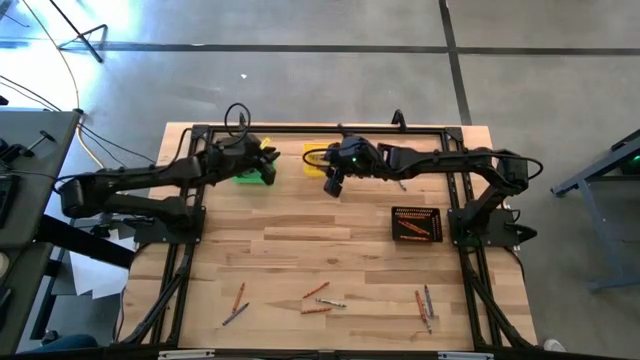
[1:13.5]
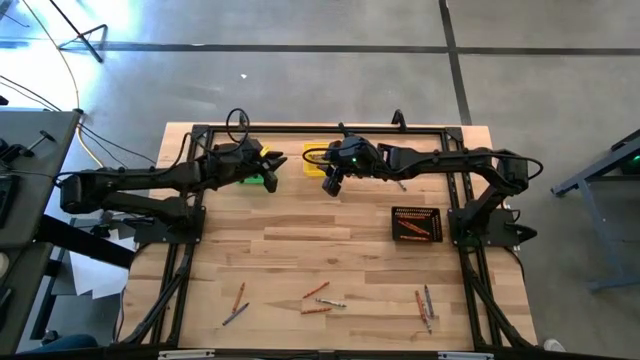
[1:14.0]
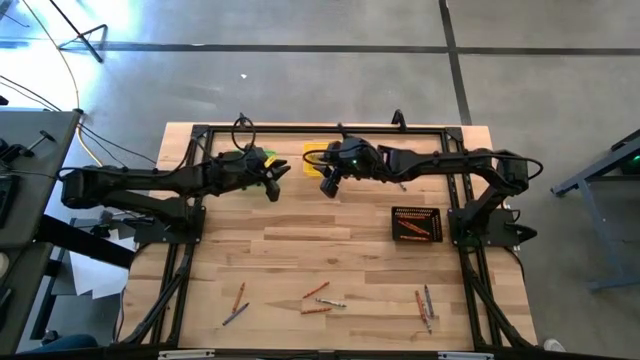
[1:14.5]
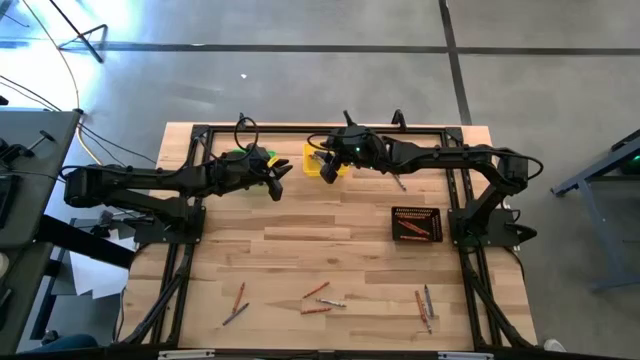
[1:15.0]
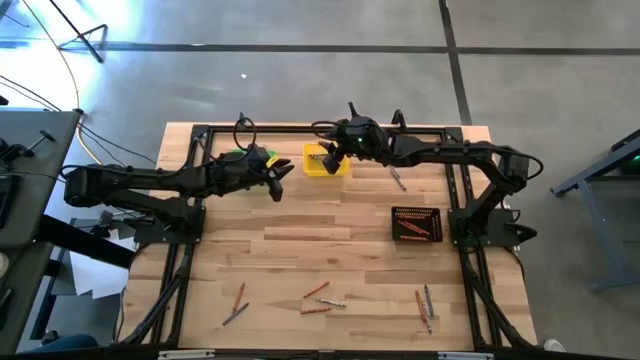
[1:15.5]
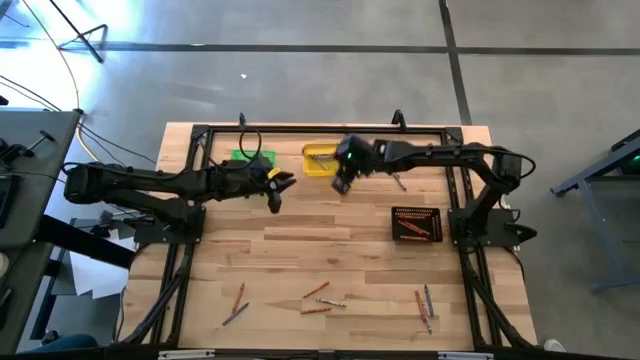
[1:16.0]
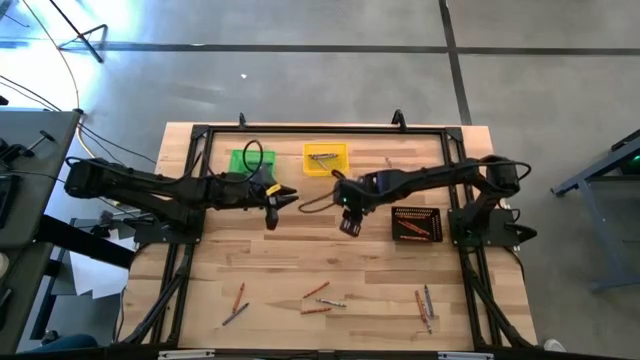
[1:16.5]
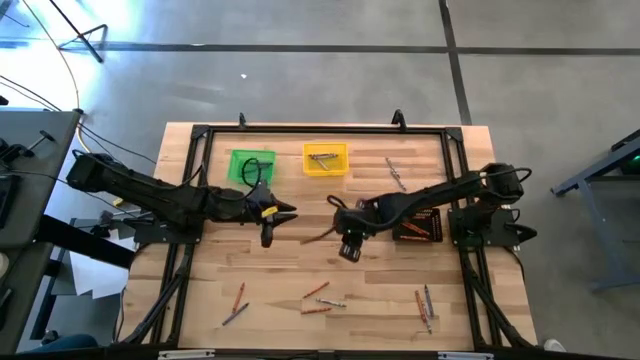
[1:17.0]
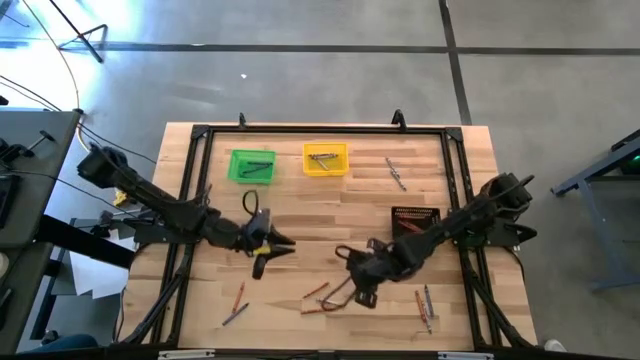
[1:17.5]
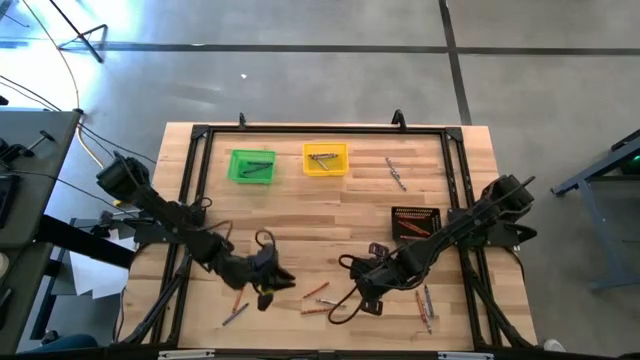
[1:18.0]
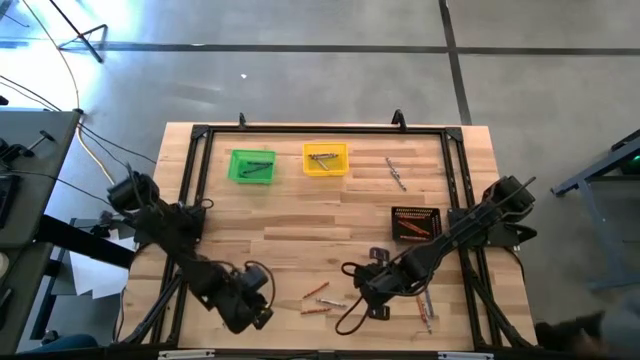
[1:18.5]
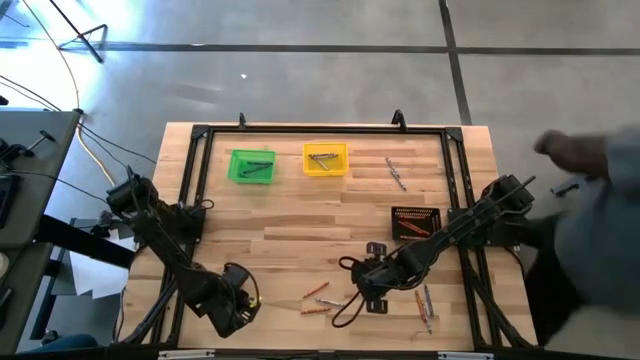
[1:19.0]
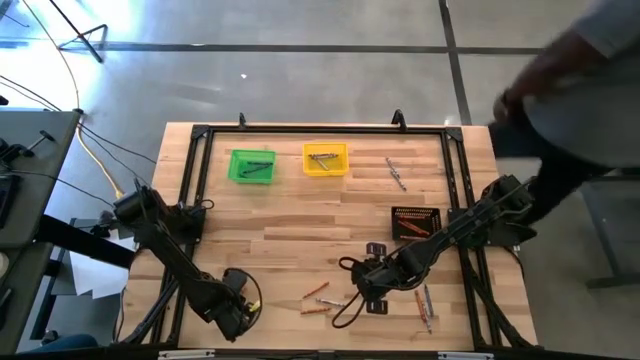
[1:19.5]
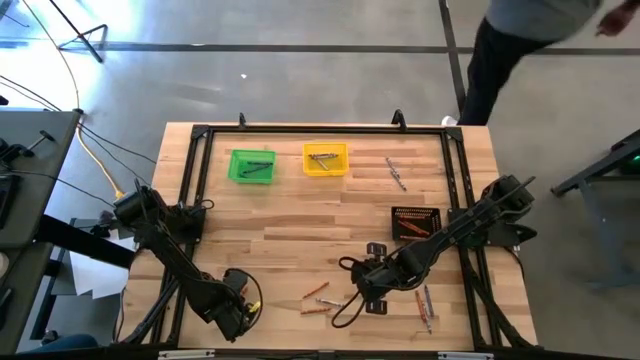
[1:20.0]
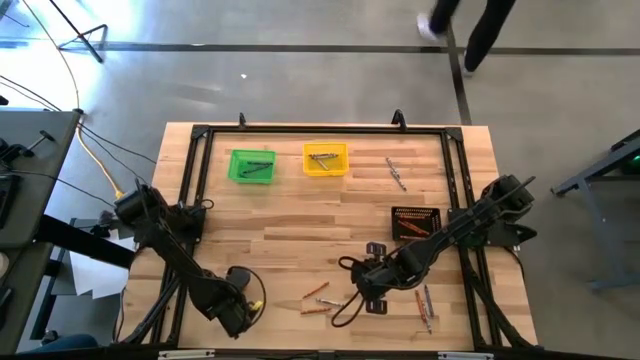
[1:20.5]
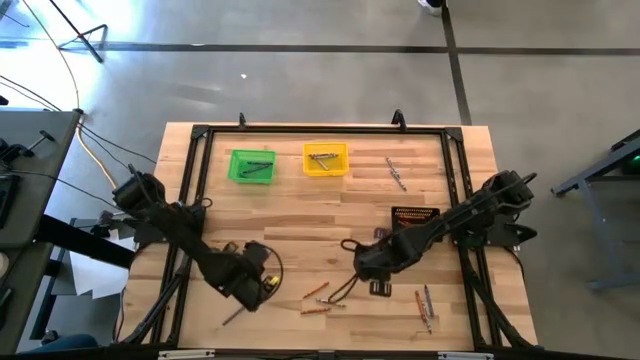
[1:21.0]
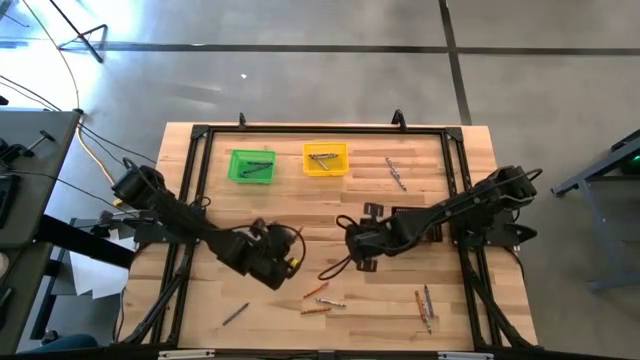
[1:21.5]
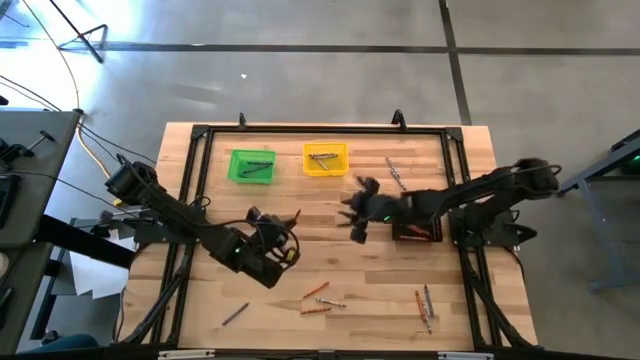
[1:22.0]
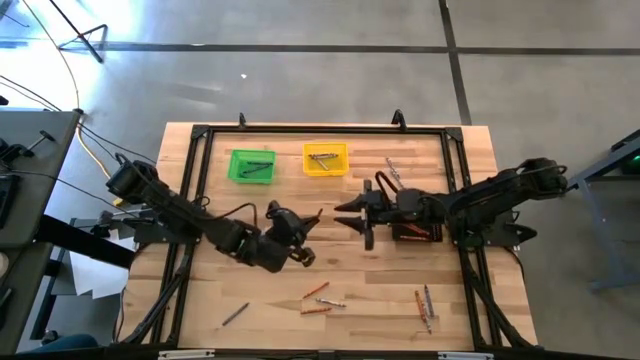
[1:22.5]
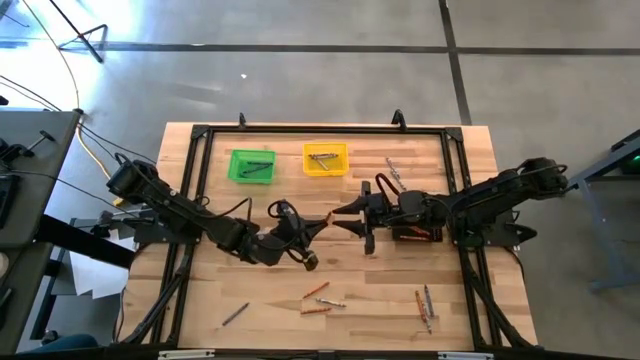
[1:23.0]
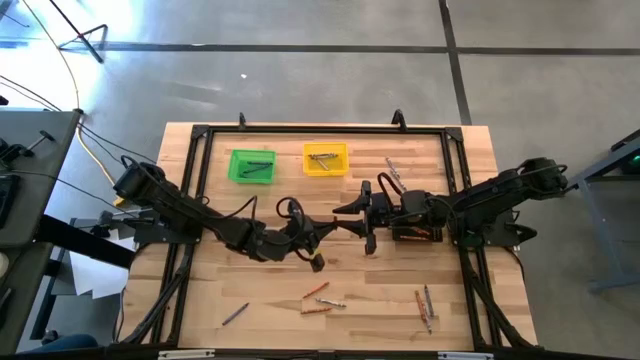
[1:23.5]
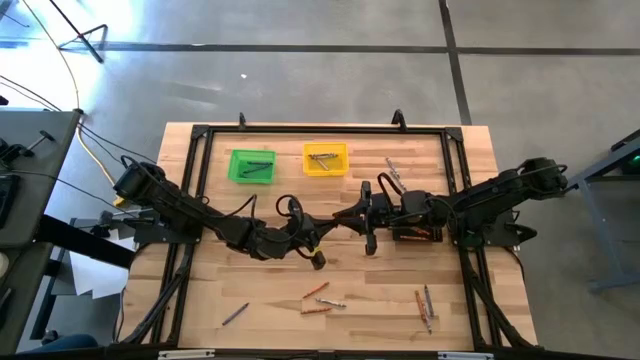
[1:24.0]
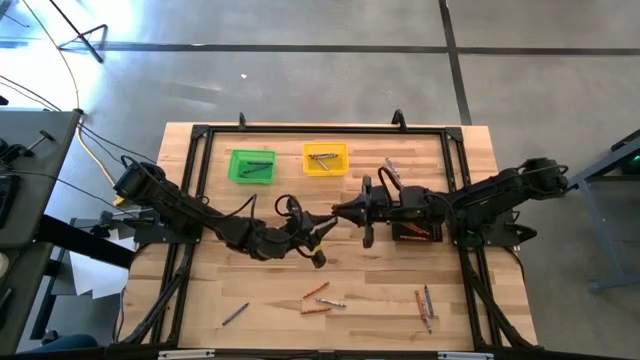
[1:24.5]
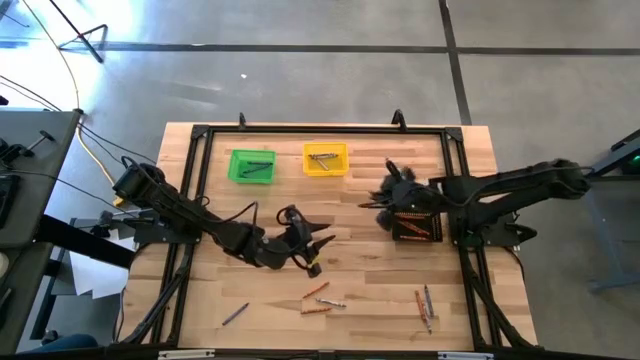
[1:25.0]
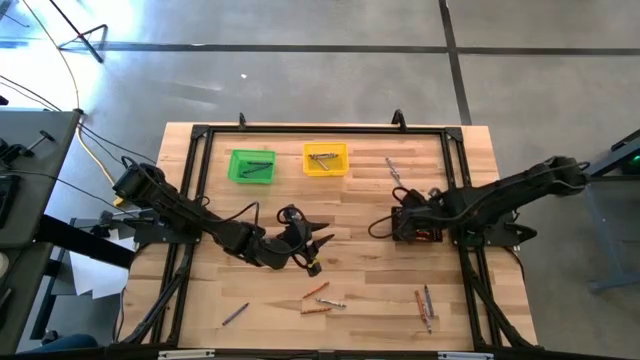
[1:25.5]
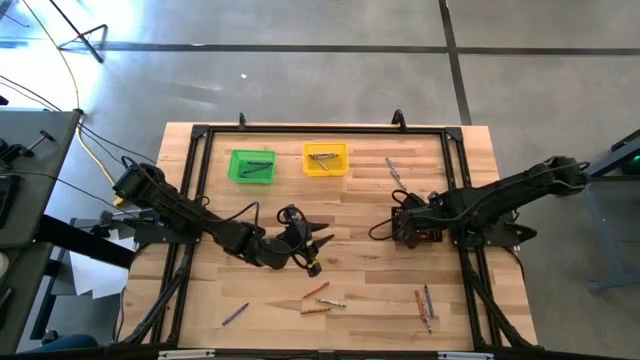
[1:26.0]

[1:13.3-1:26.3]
Task: Sort crayons
Put the orange crayon into the black bin

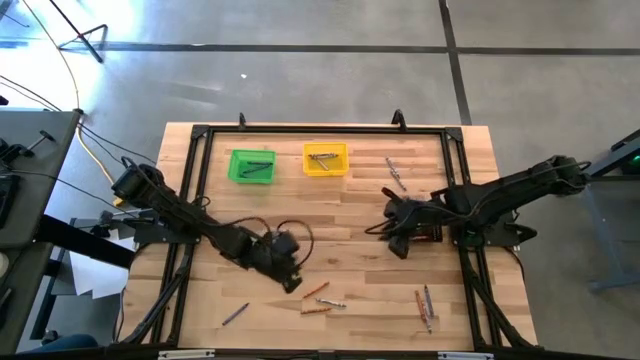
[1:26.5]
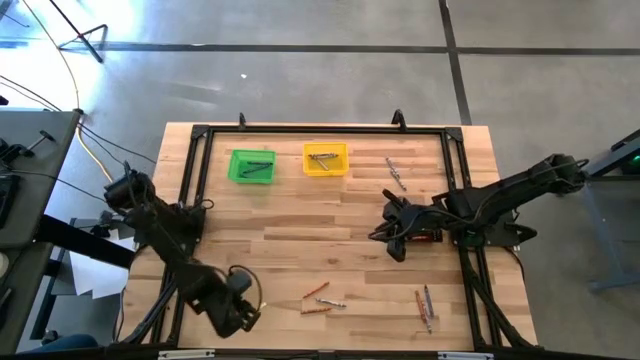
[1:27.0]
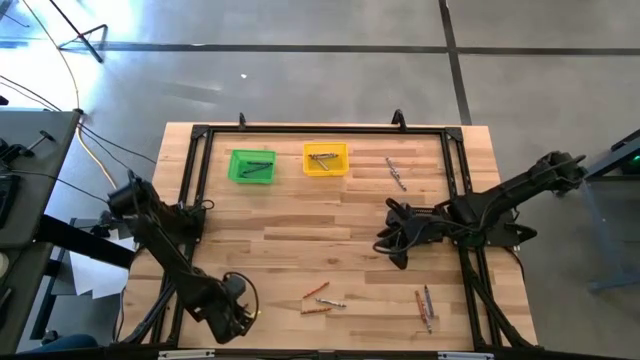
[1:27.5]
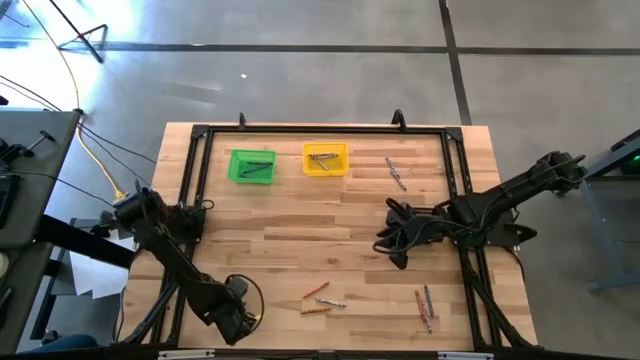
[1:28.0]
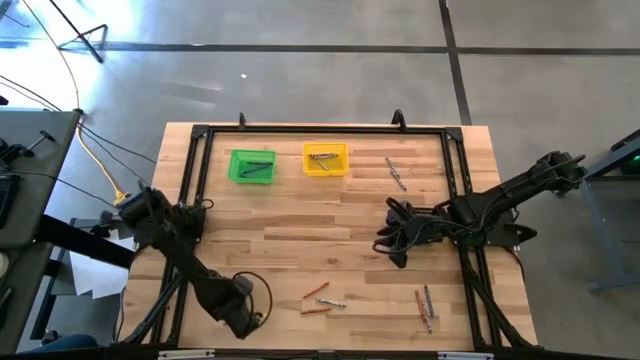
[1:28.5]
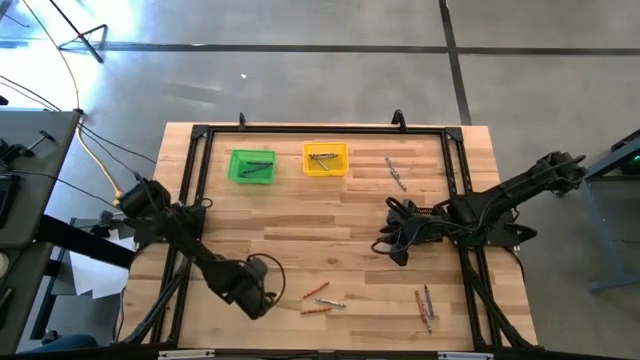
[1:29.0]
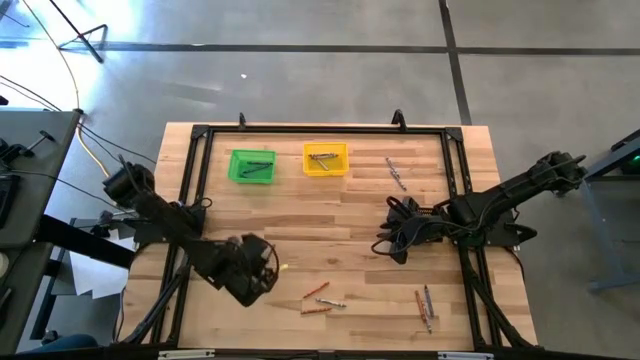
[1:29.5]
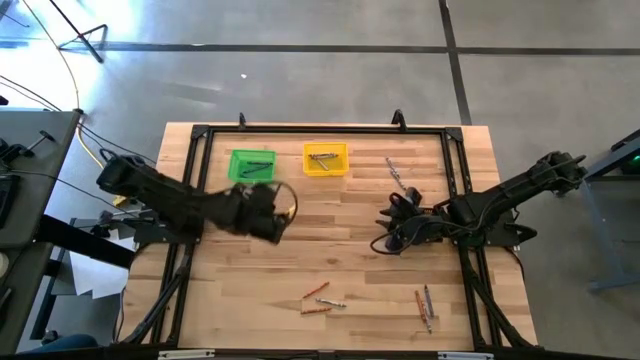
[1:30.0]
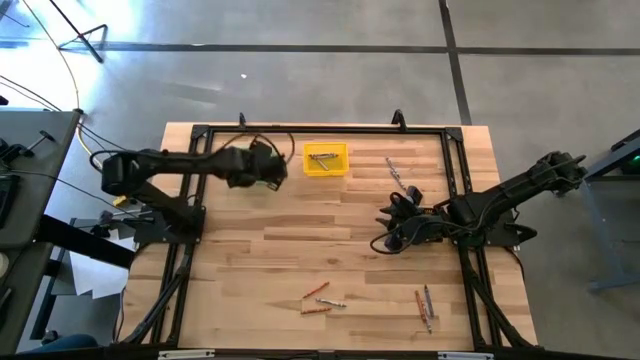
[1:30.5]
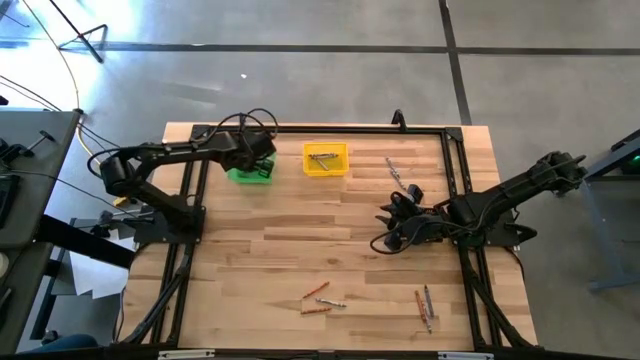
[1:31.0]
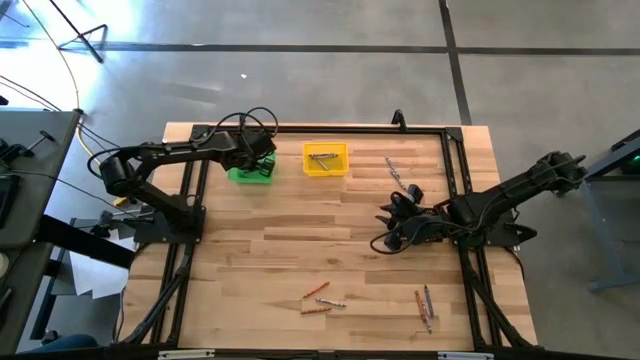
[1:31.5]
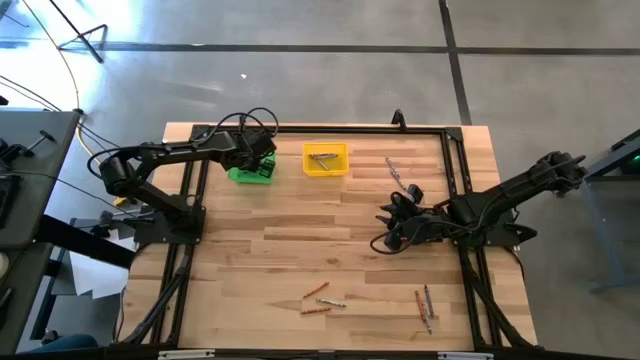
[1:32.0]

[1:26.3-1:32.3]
Put the blue crayon into the green bin

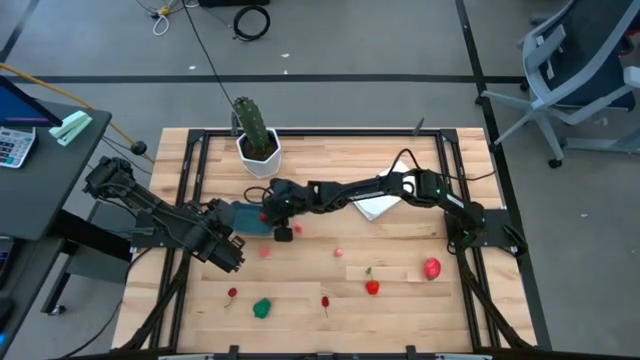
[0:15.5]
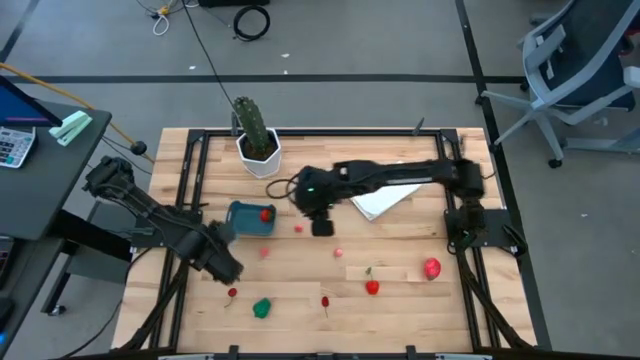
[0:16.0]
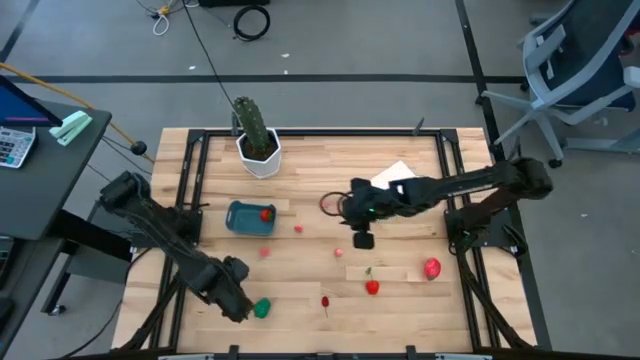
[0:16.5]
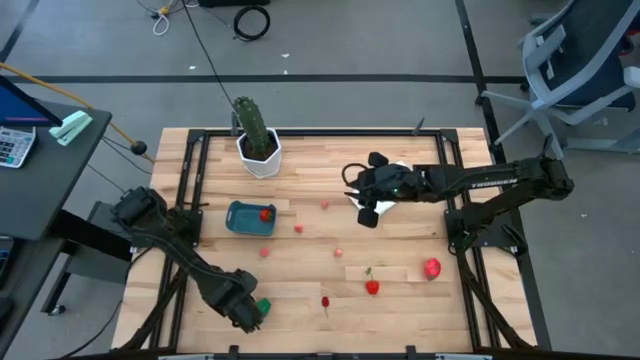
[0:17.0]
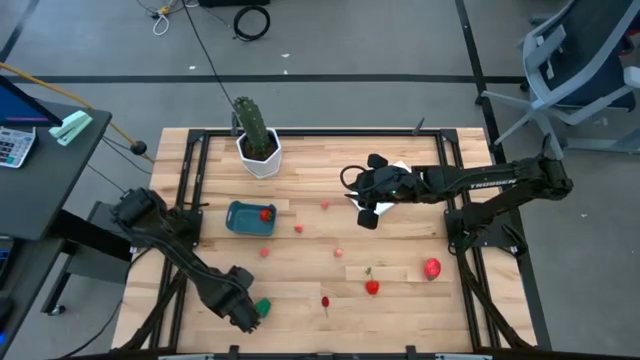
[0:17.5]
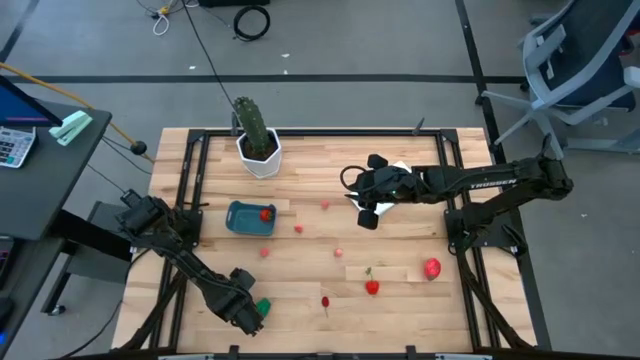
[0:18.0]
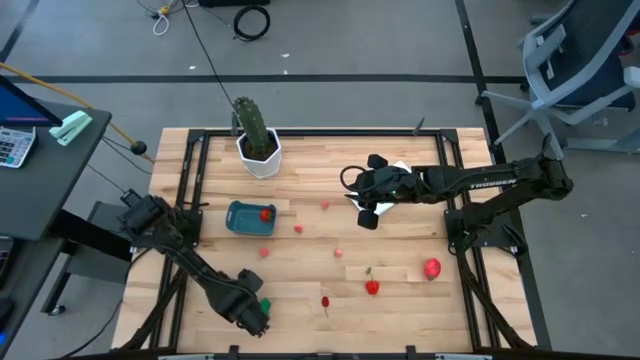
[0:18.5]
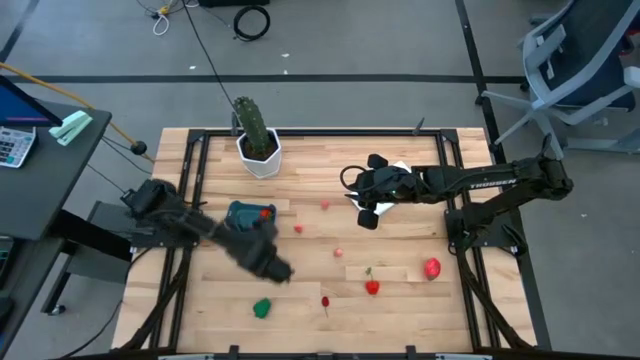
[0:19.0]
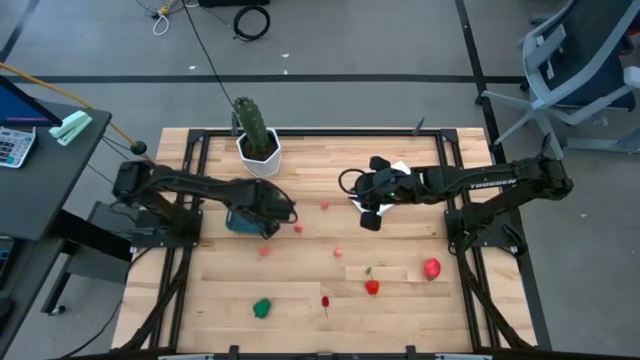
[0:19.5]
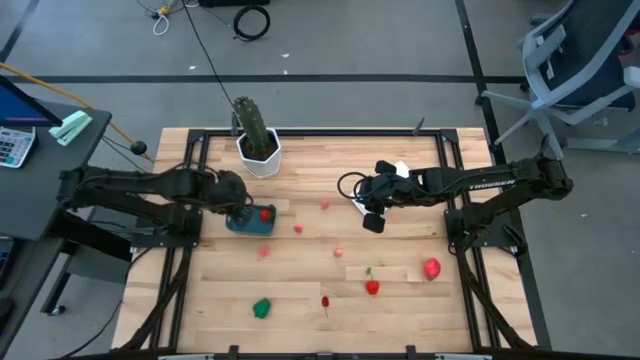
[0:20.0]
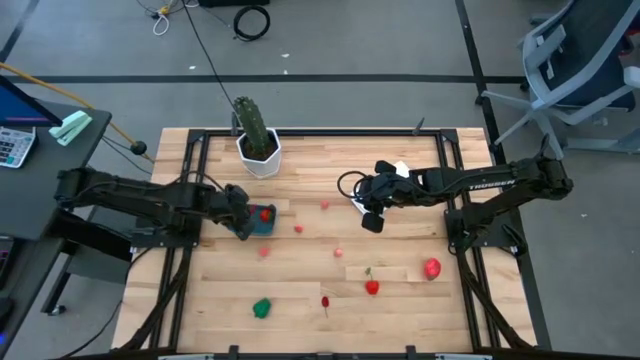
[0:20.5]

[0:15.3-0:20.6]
Task: Pick and placing Produce into tupperware
Put the left red cherry into the blue bin
